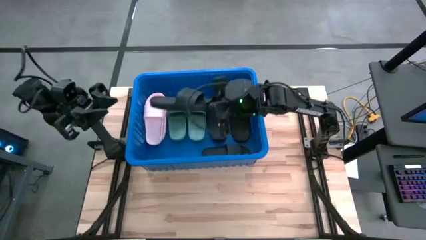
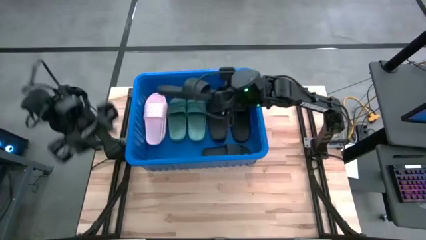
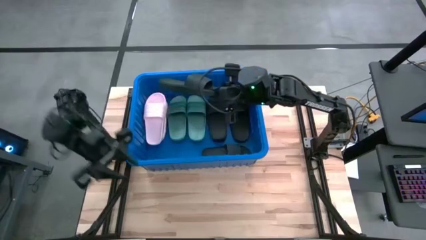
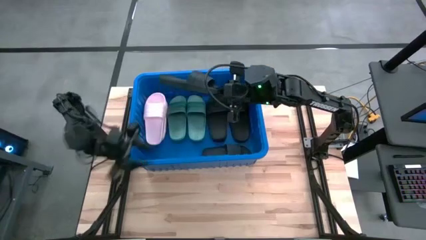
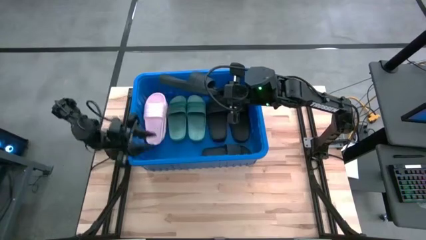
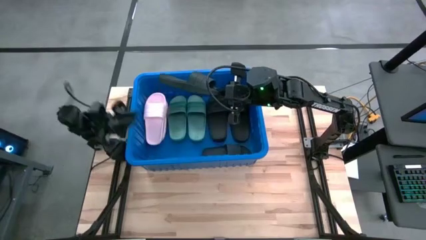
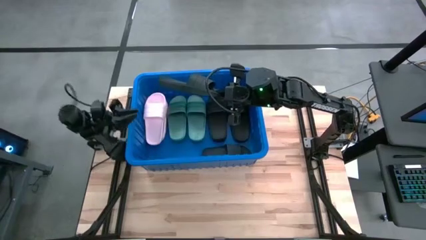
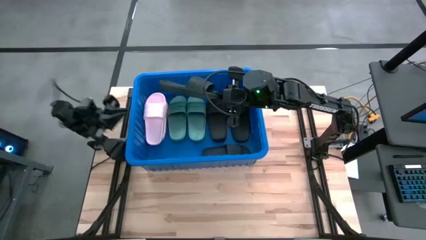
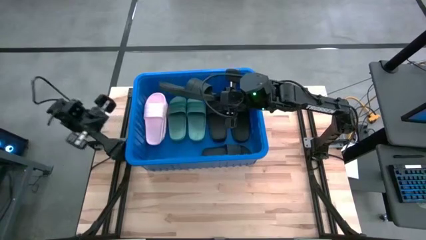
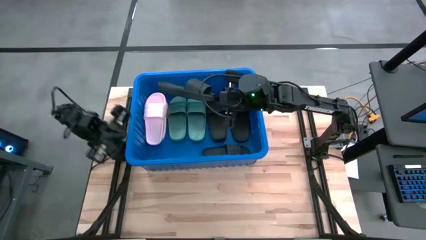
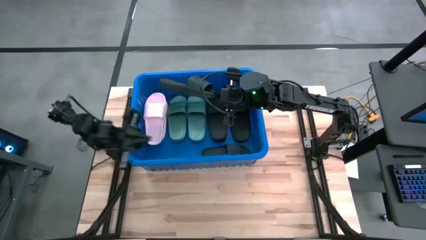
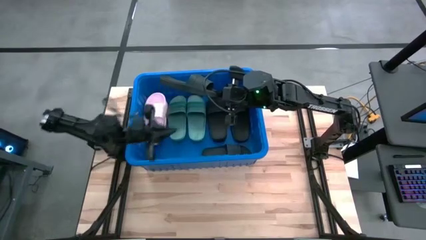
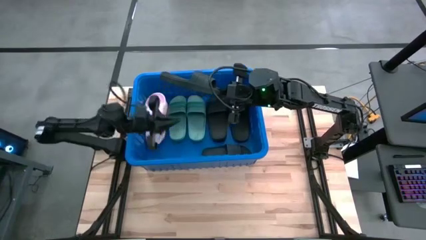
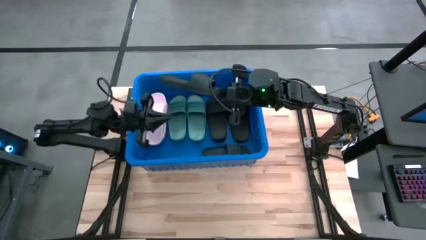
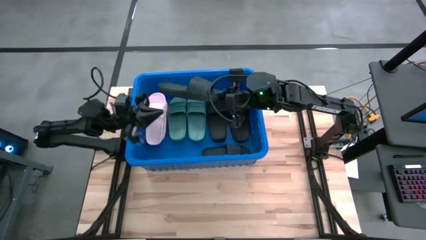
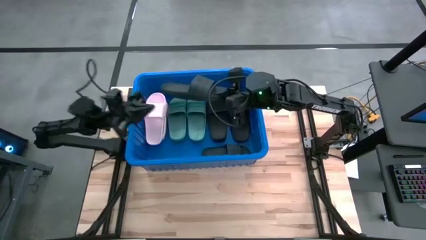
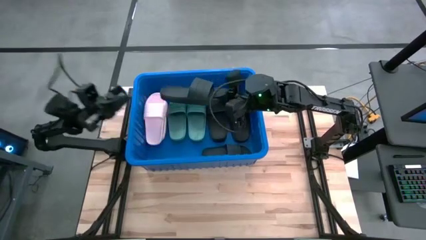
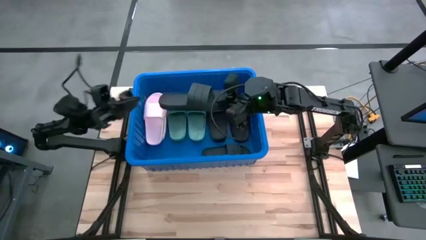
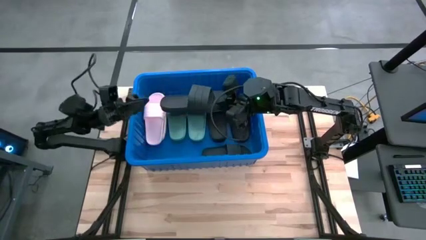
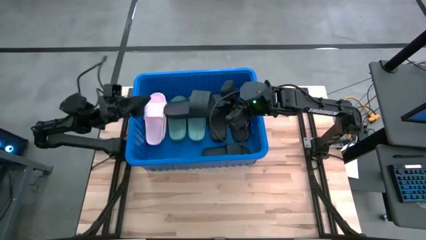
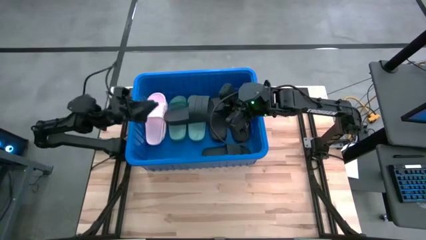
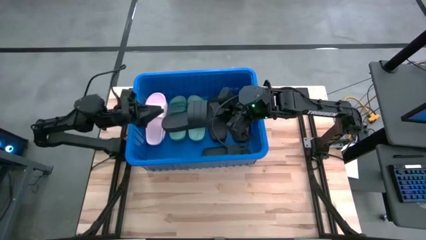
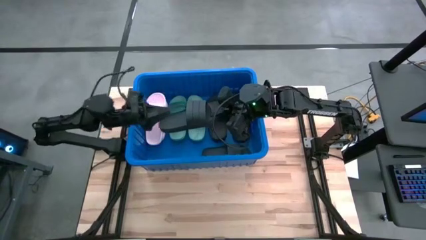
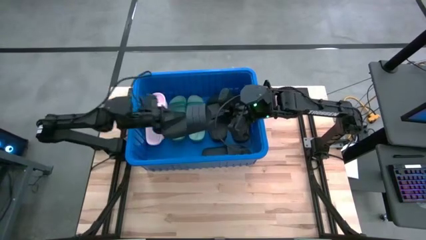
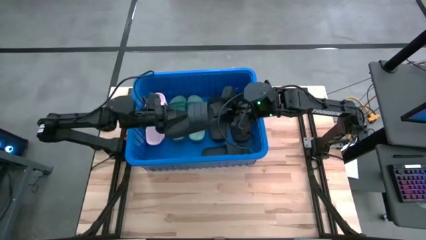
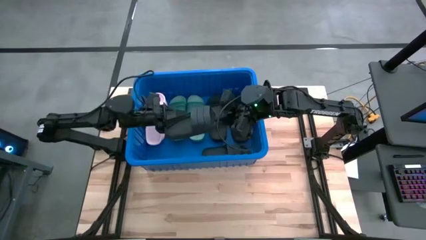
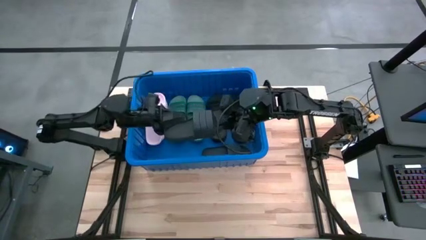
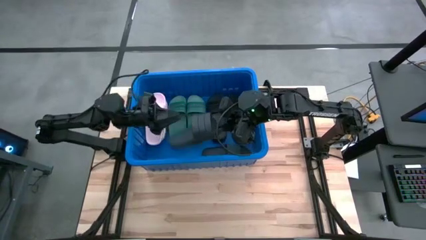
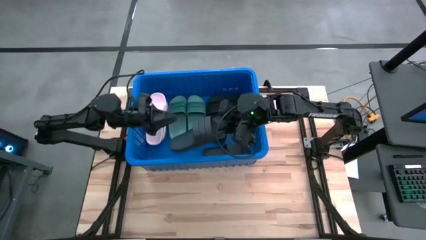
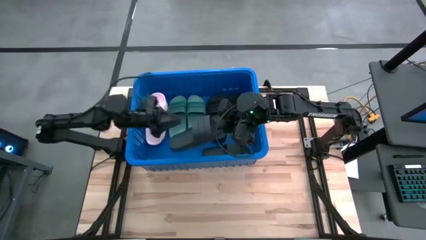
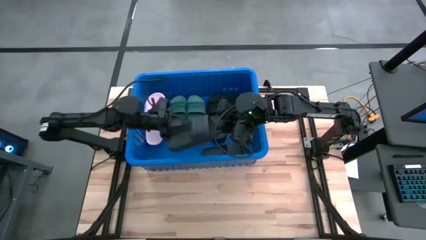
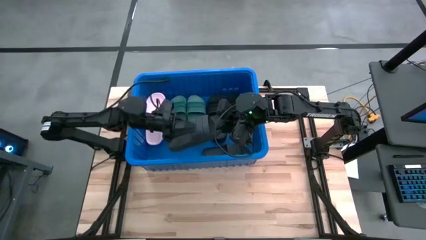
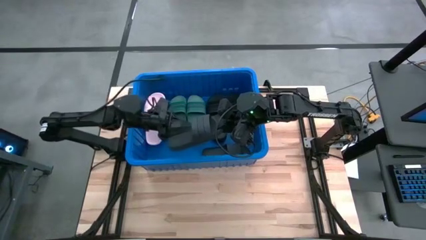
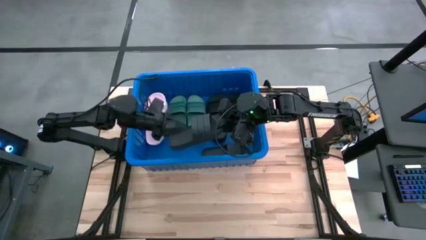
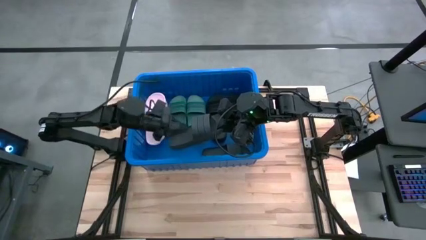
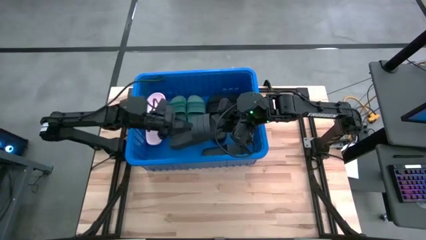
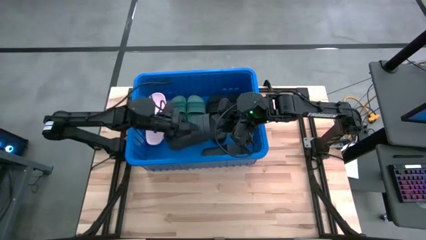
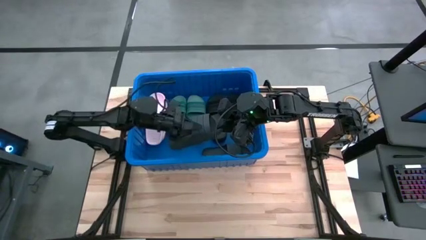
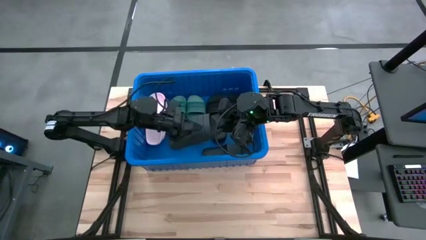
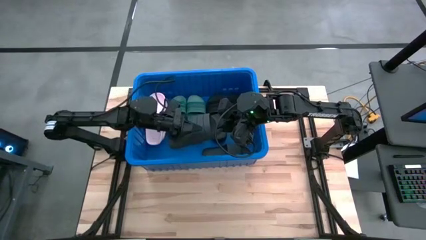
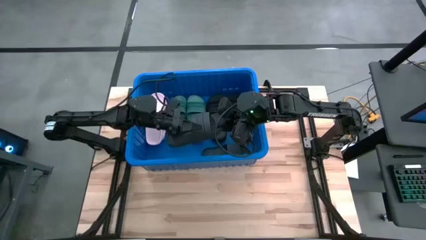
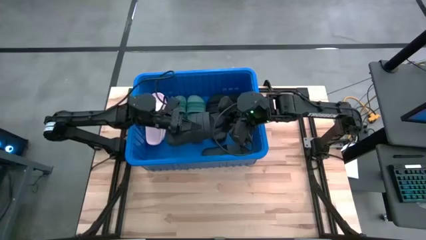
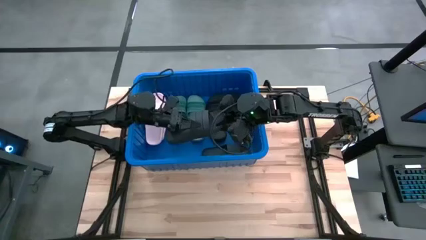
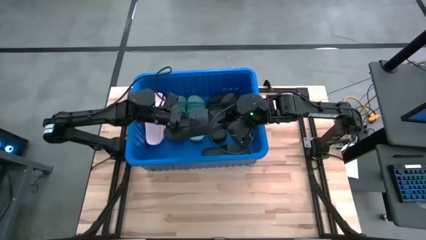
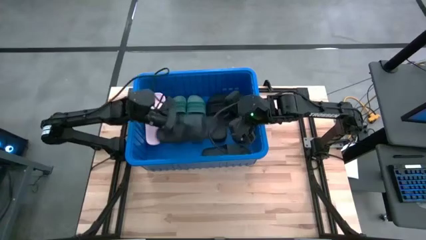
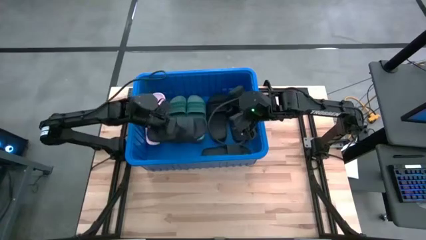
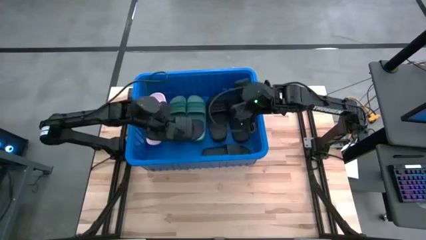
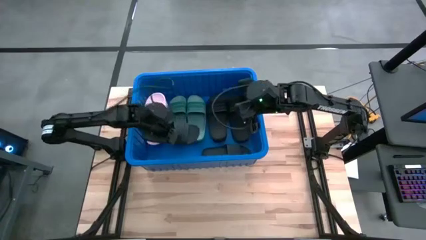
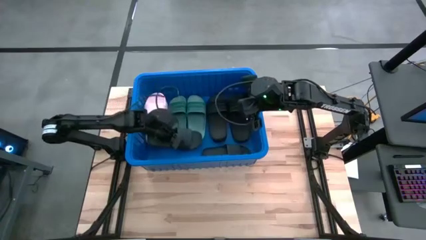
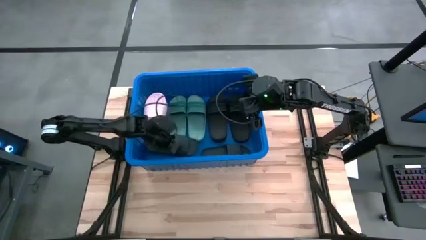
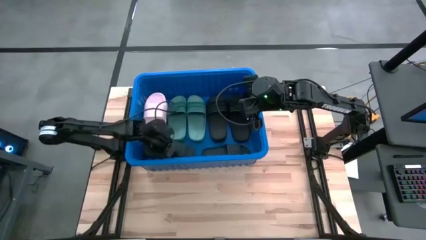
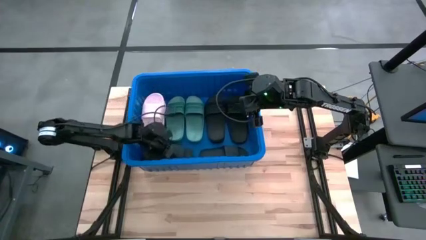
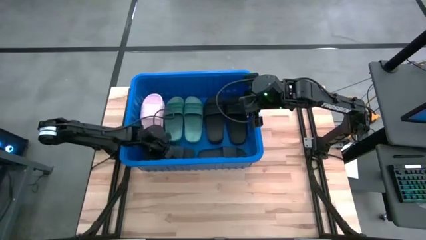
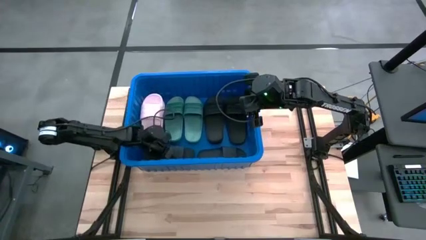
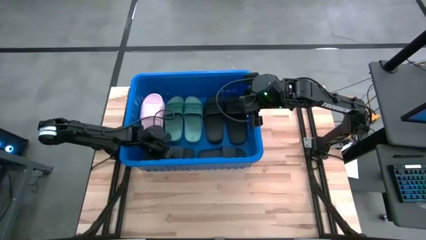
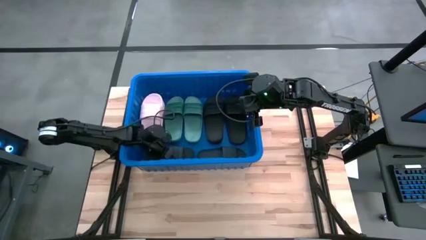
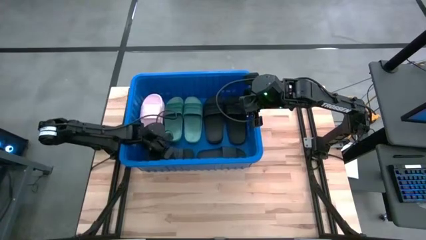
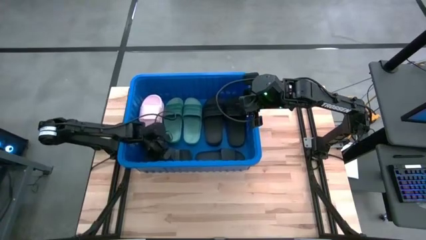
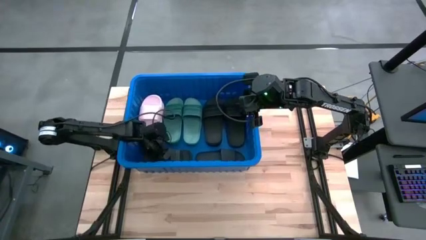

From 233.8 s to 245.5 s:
Task: Pick and place slides into bin
Put the black slide into the blue bin

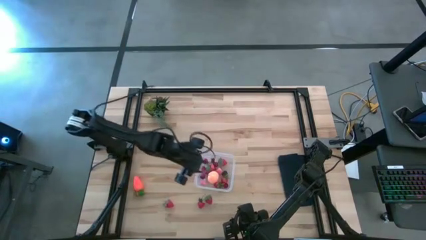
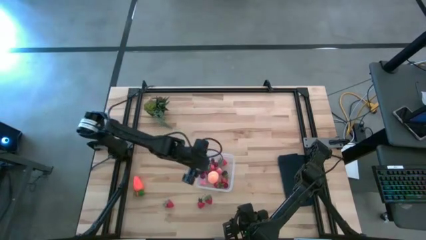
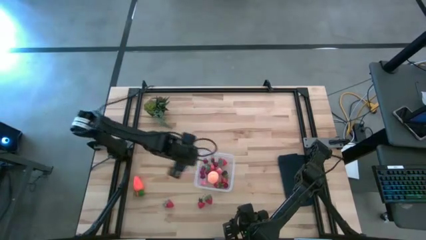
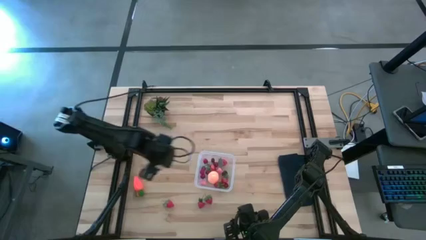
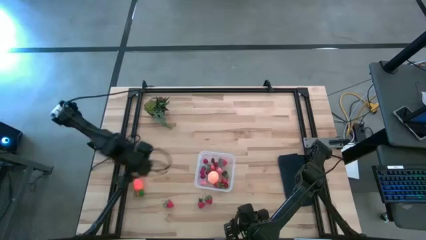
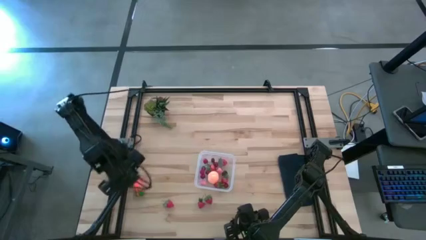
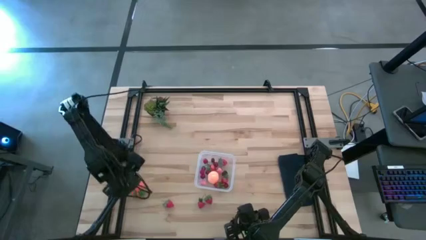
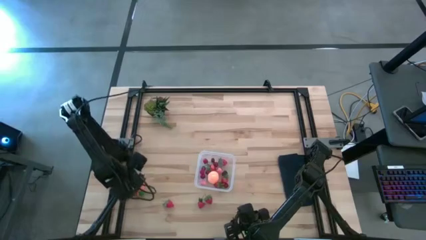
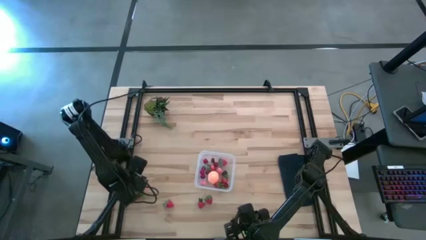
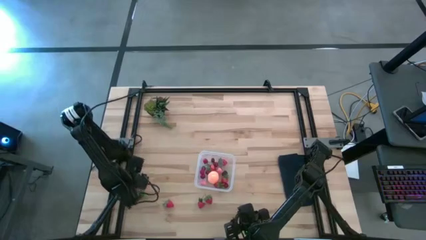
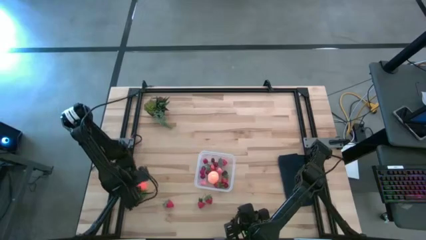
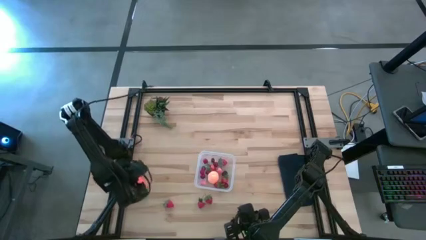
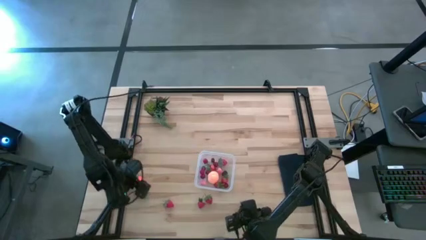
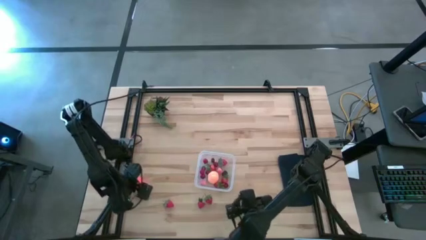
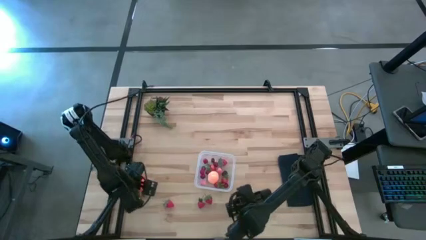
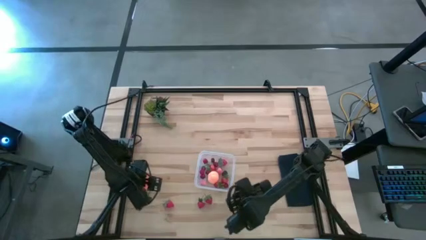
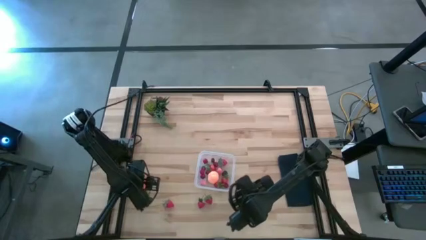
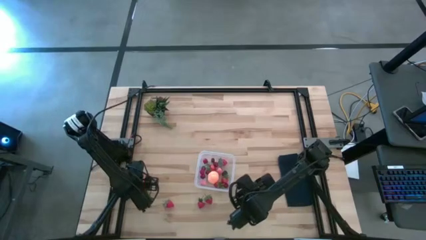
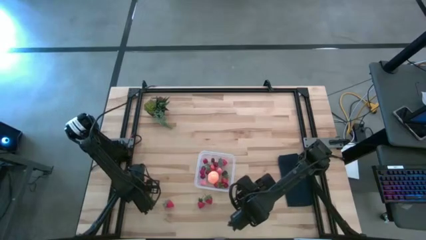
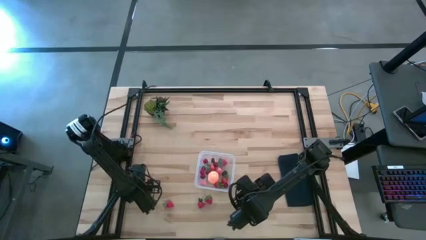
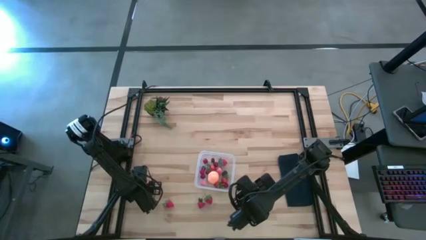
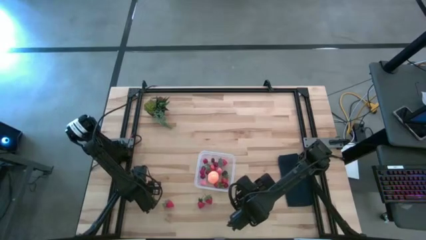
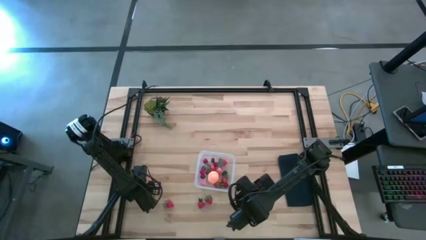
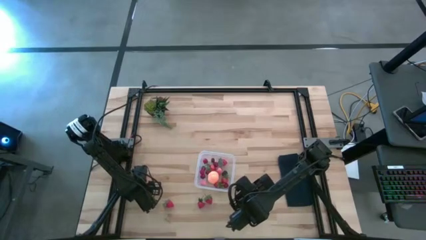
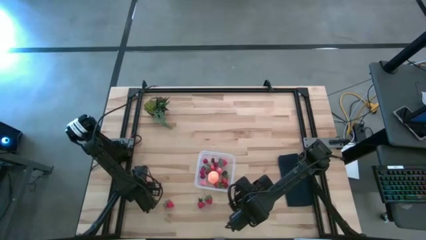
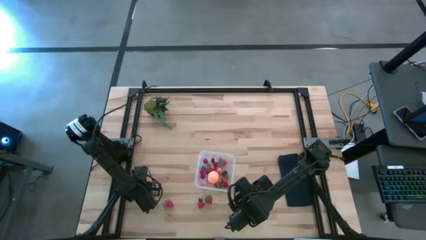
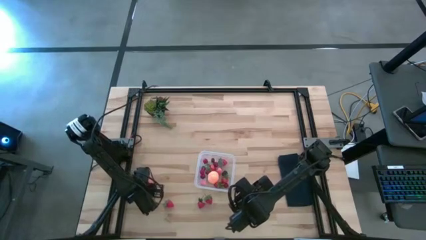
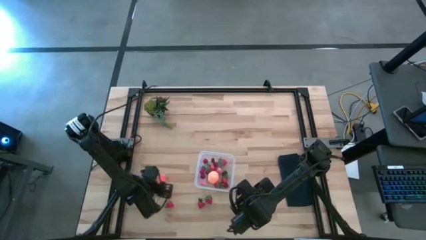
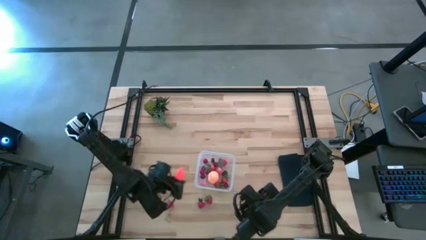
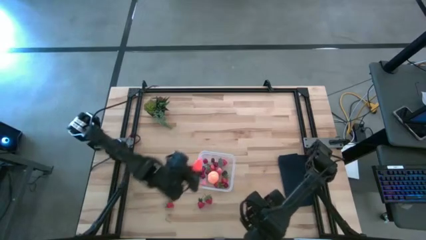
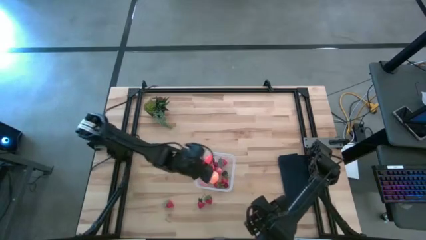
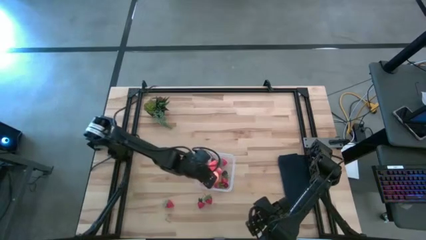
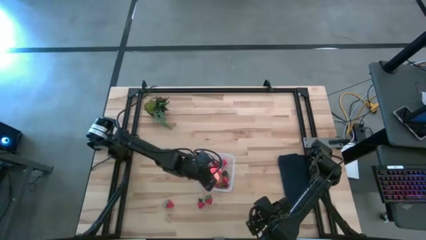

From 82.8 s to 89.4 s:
Task: Pick and placing Produce into tupperware
Put the carrot into the transparent container
